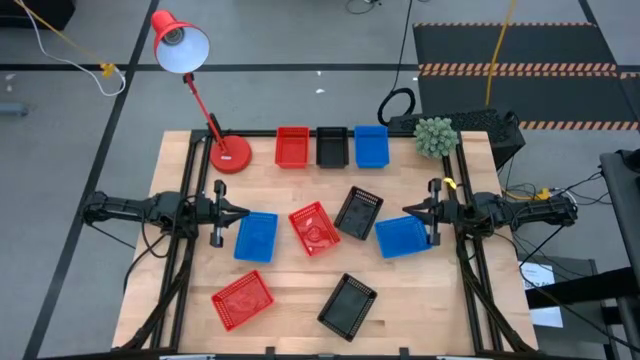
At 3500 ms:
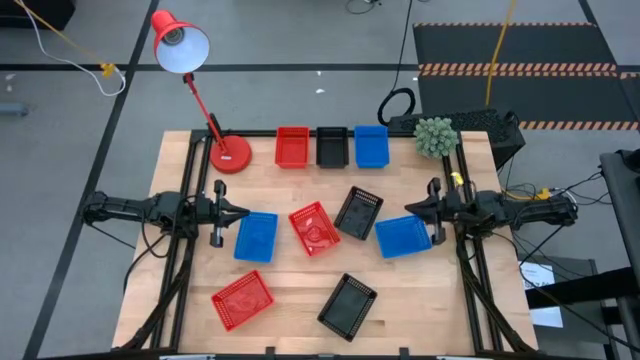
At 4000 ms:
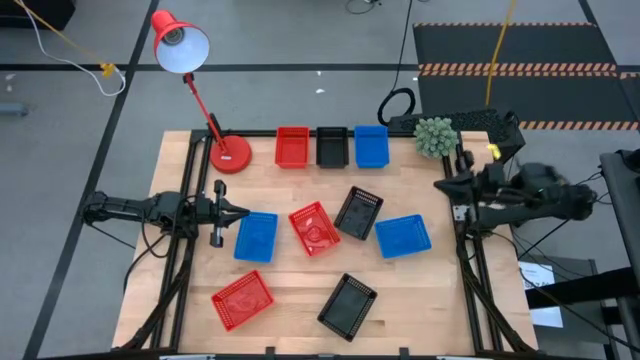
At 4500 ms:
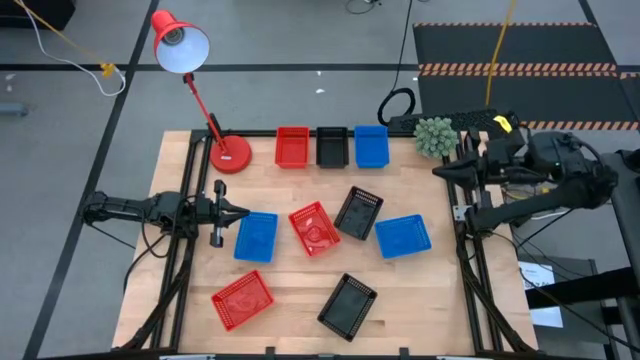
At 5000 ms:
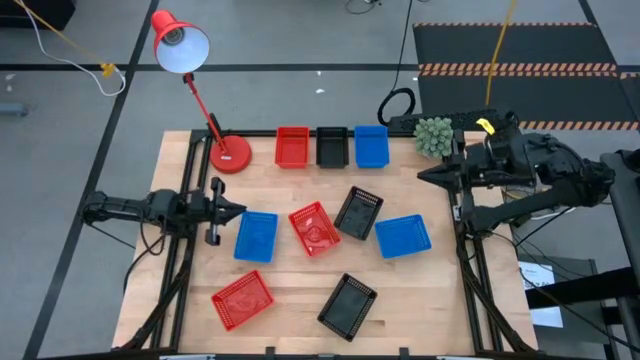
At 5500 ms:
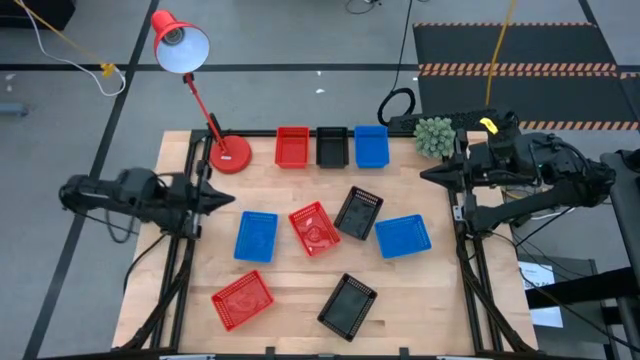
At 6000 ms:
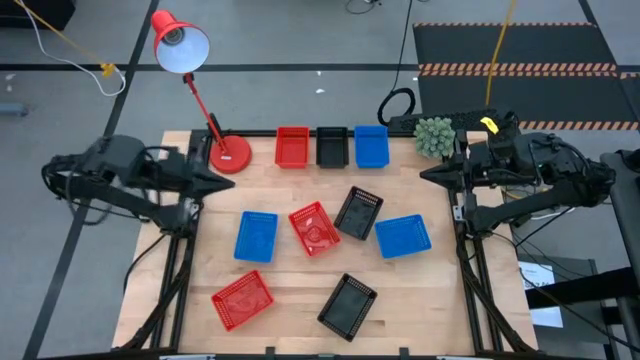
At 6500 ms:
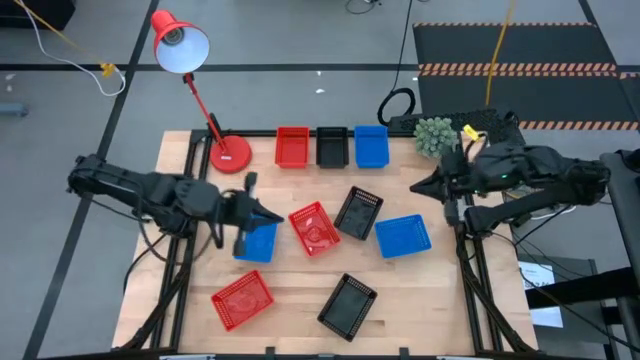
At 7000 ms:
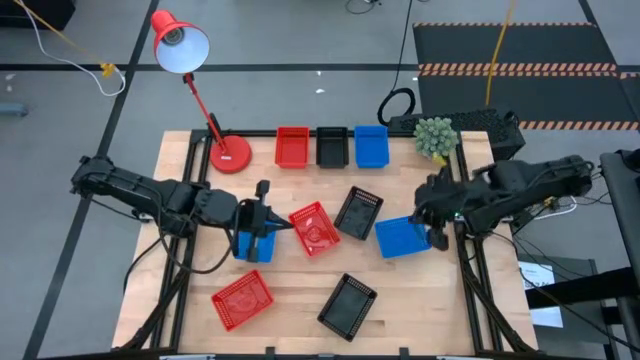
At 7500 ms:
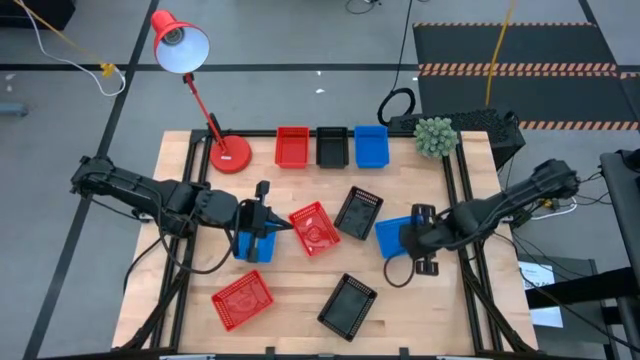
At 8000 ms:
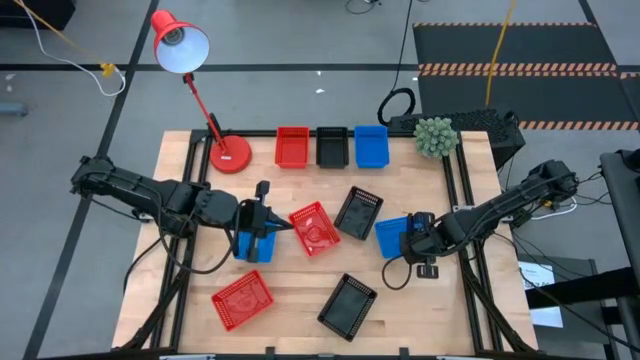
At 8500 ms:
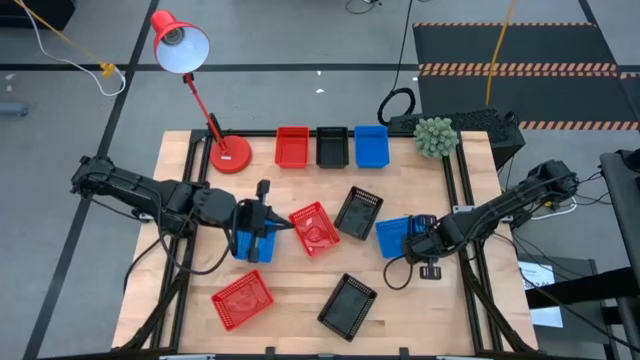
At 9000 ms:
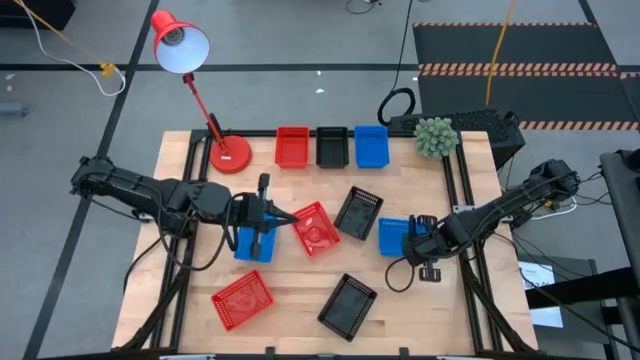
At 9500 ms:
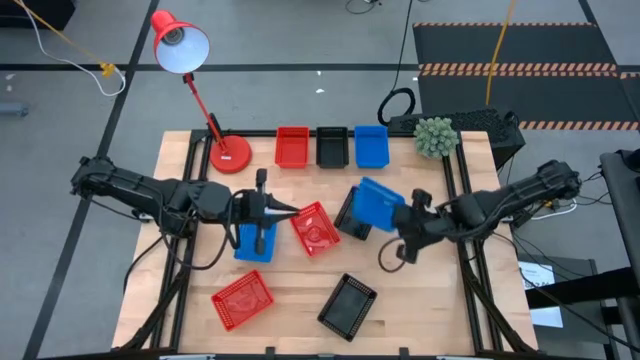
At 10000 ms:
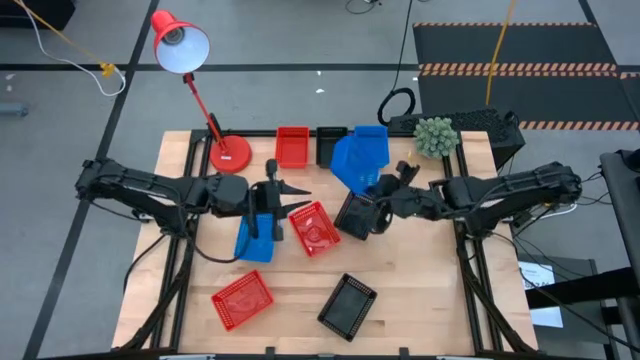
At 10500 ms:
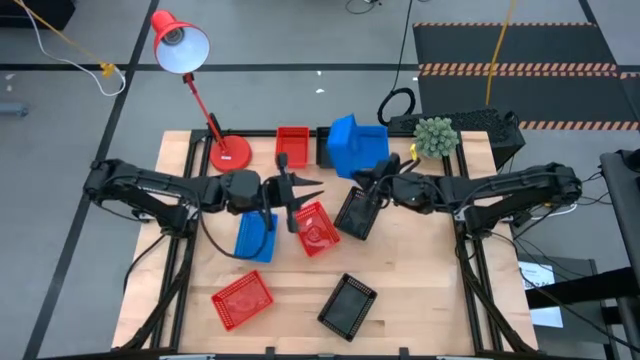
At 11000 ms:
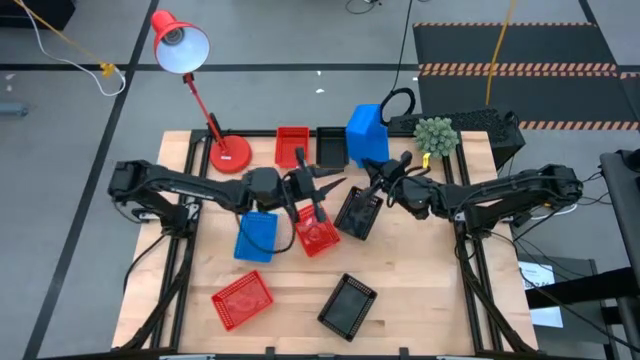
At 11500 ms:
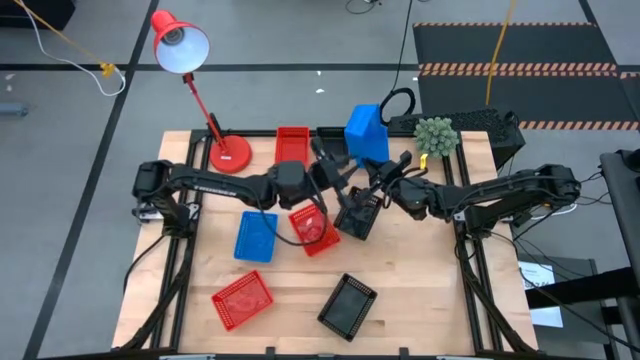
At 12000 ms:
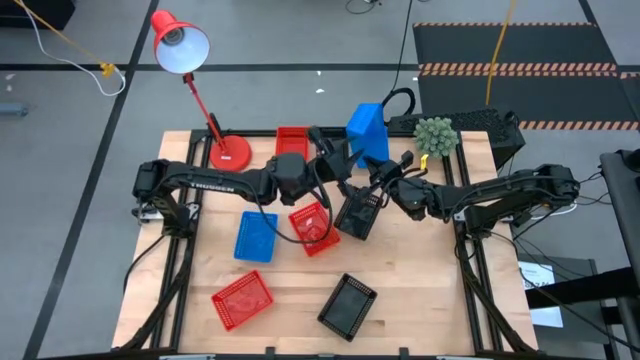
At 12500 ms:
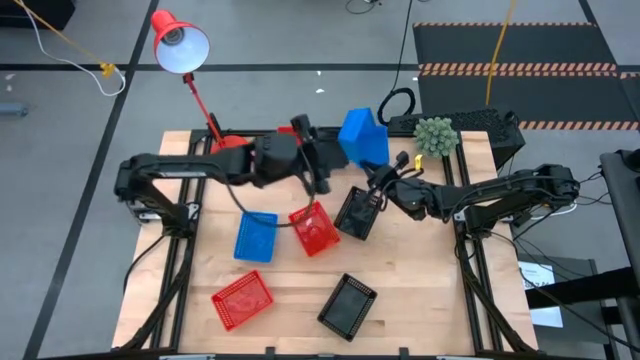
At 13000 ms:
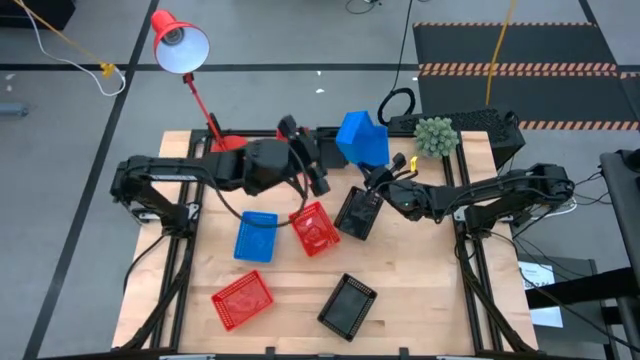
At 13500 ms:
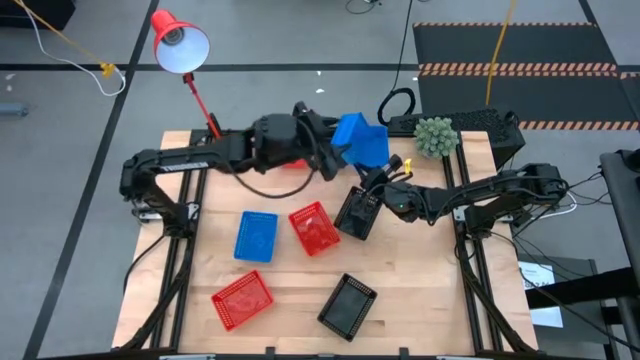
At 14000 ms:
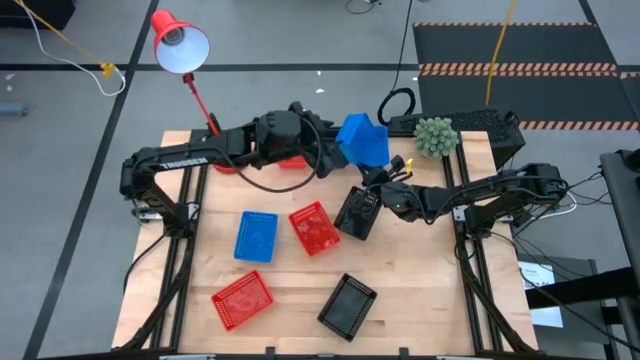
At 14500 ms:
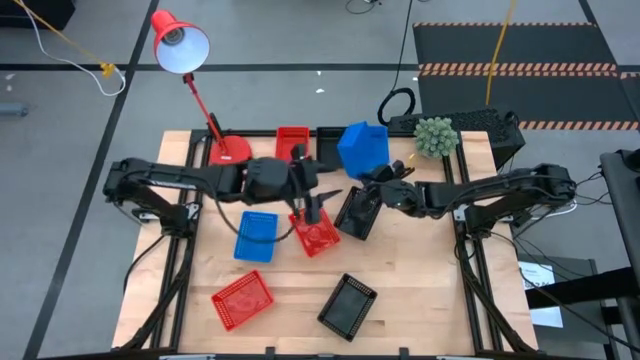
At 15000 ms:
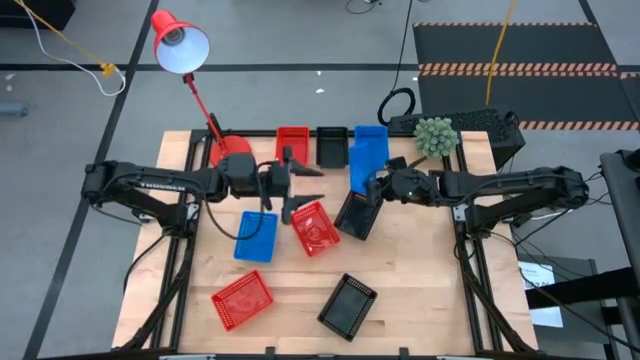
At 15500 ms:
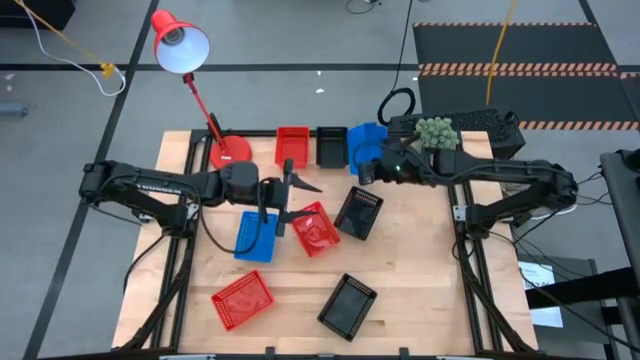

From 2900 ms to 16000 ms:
Stack the bottom right blue bin on top of the top blue bin
